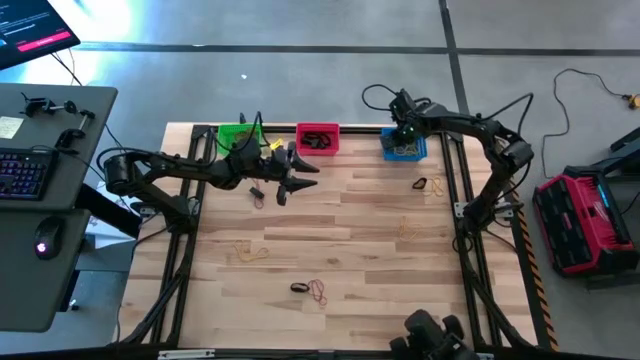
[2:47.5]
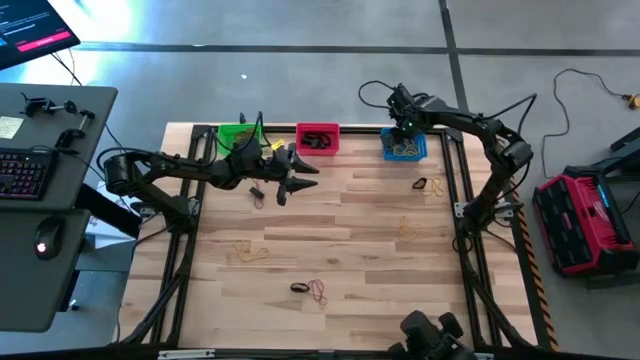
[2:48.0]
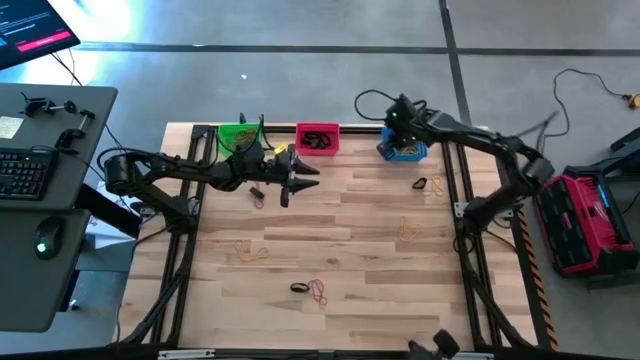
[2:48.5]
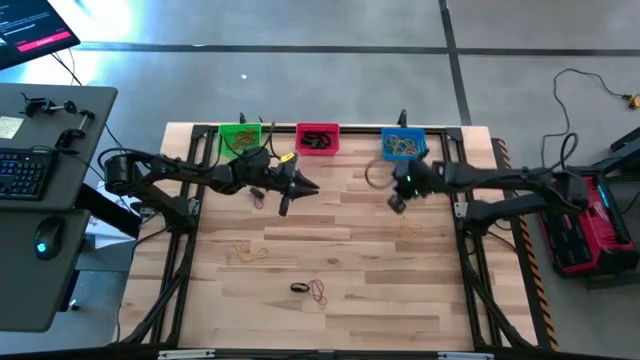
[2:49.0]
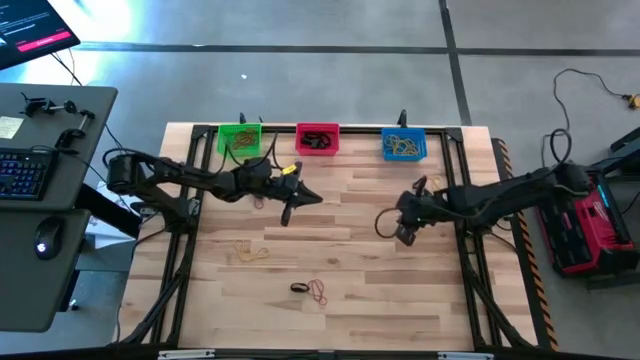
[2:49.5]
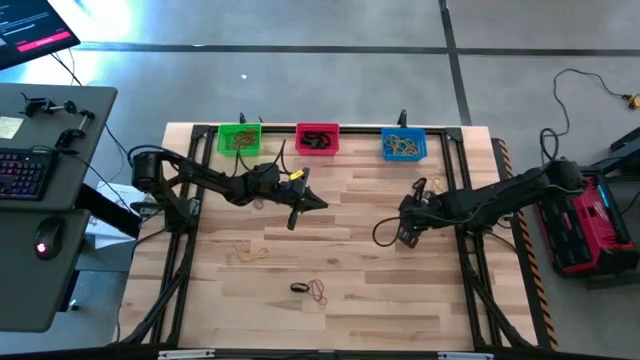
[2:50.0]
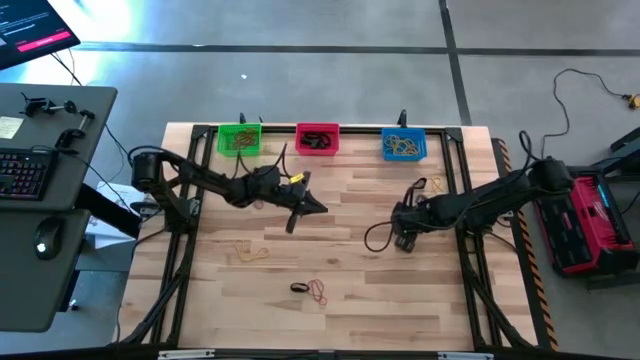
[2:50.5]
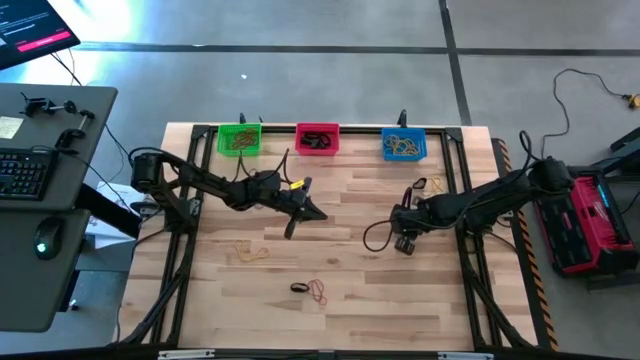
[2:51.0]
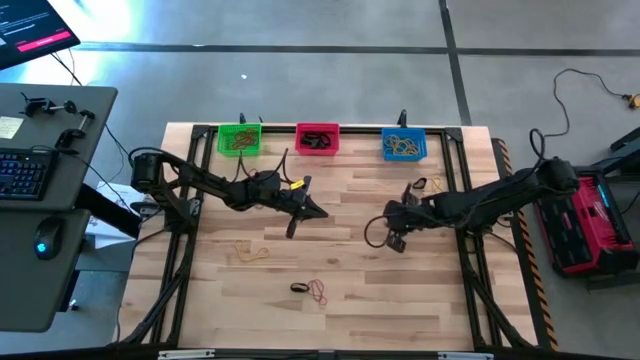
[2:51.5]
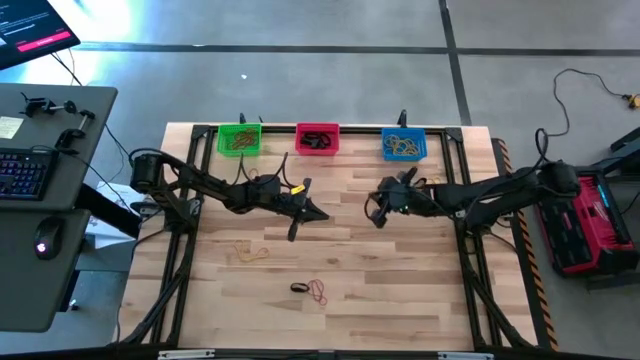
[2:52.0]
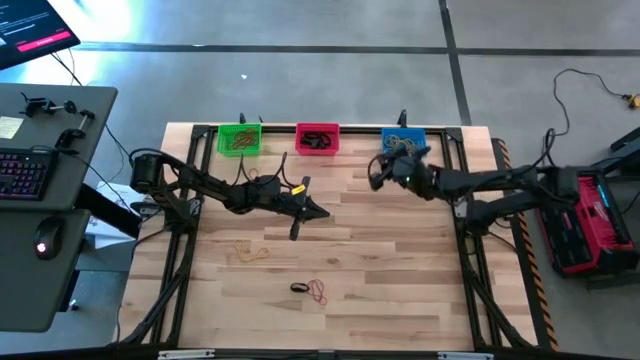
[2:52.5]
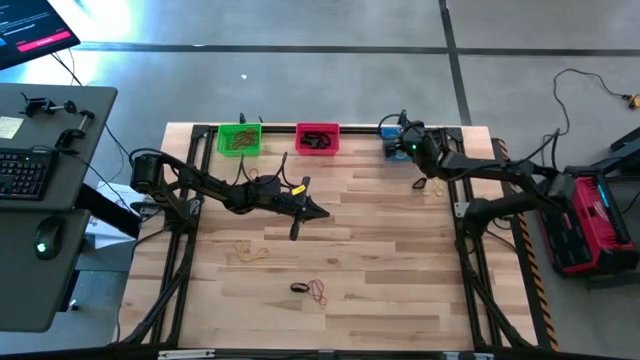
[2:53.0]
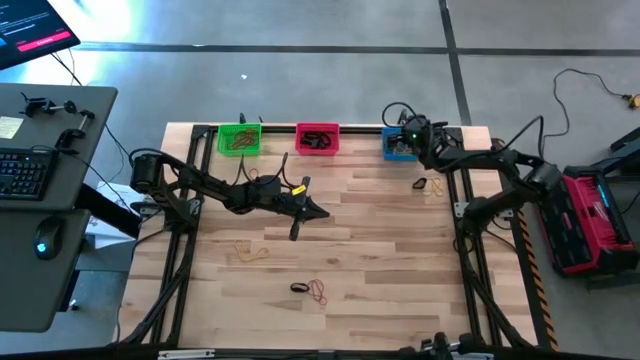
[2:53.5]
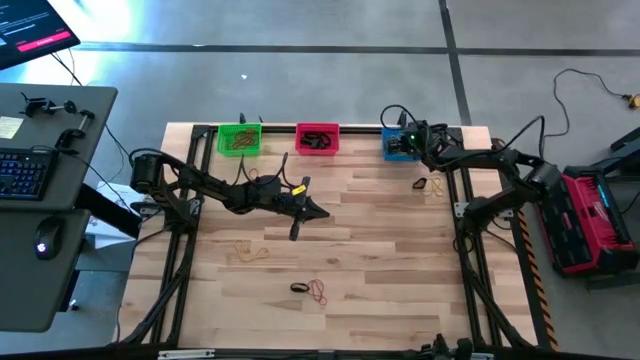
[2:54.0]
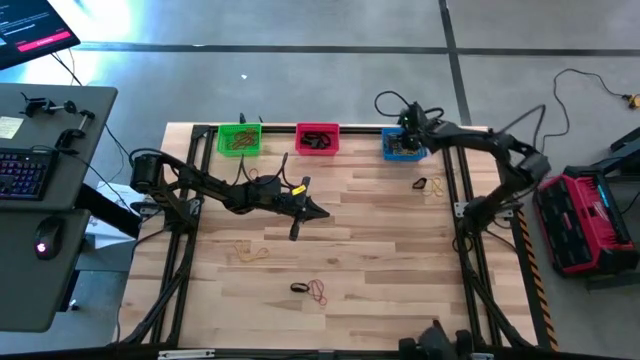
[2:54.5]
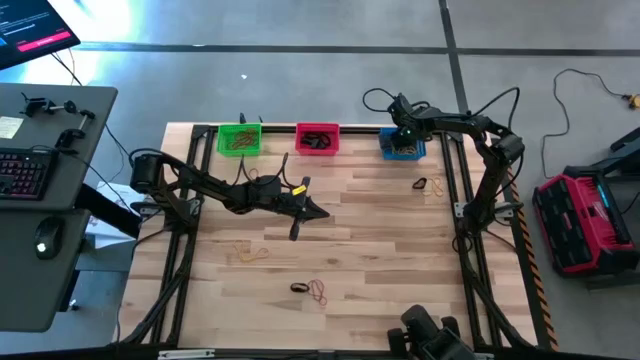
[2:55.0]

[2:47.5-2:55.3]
Task: Sort rubber bands into baskets
Put the yellow rubber band into the blue bin

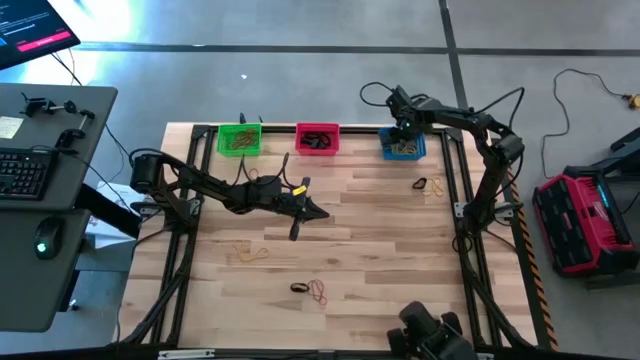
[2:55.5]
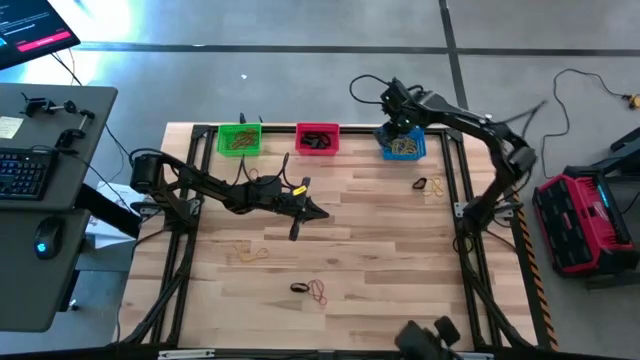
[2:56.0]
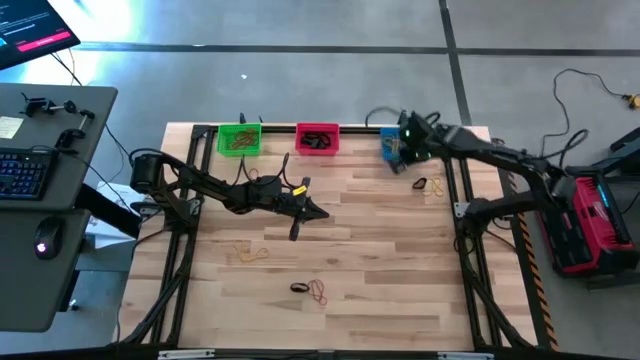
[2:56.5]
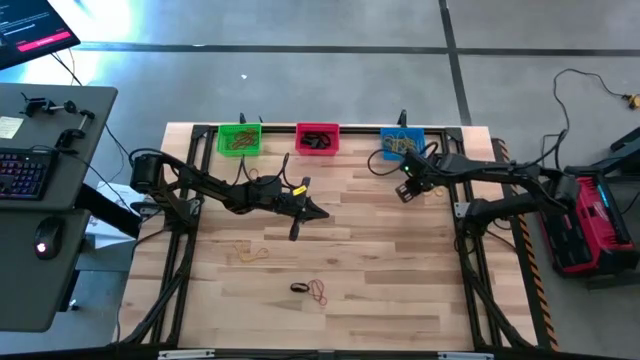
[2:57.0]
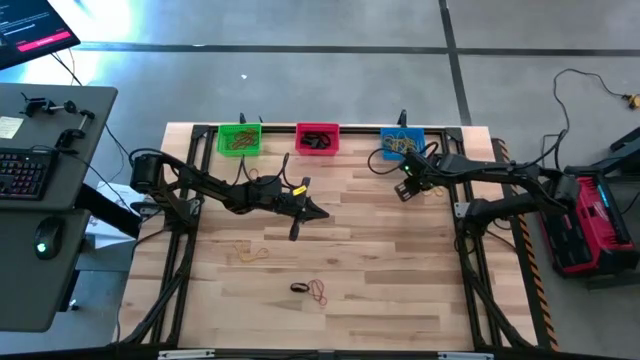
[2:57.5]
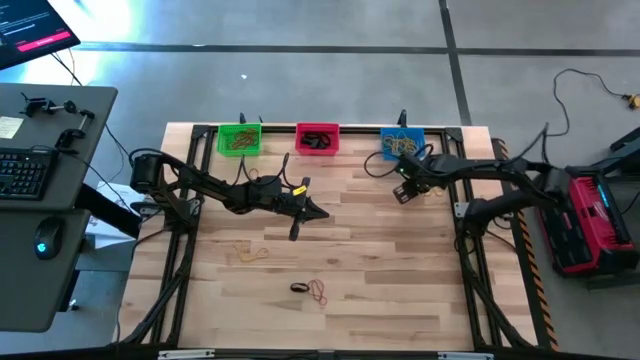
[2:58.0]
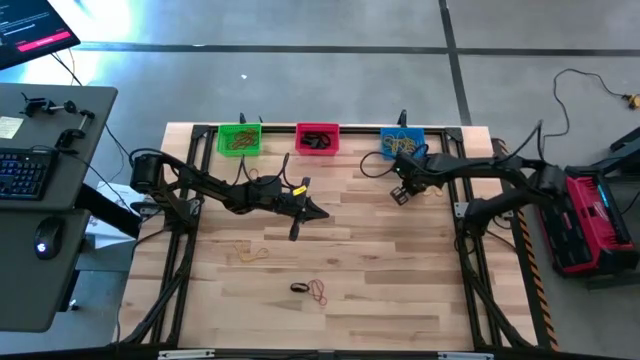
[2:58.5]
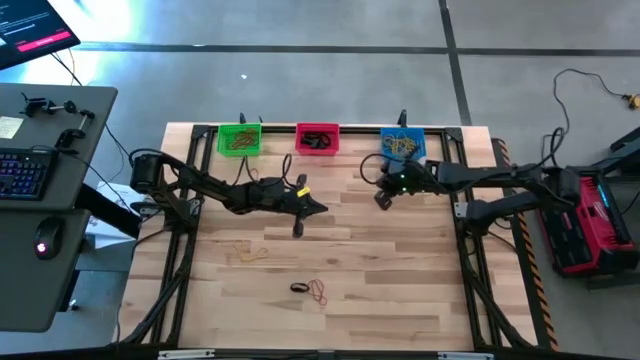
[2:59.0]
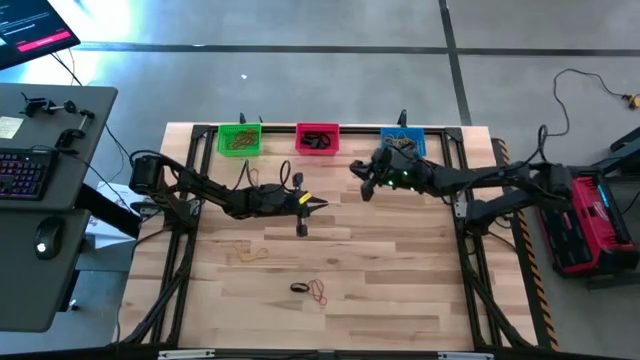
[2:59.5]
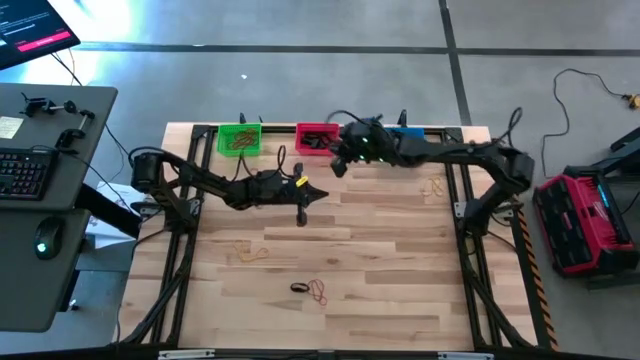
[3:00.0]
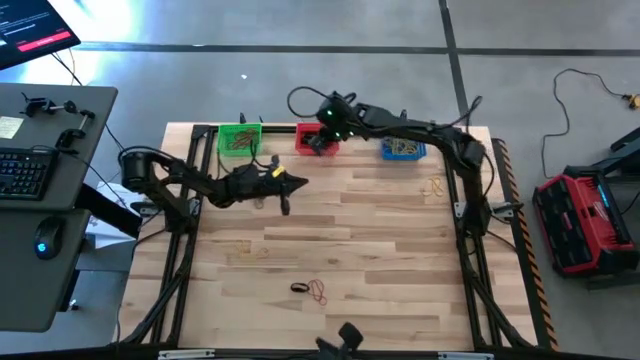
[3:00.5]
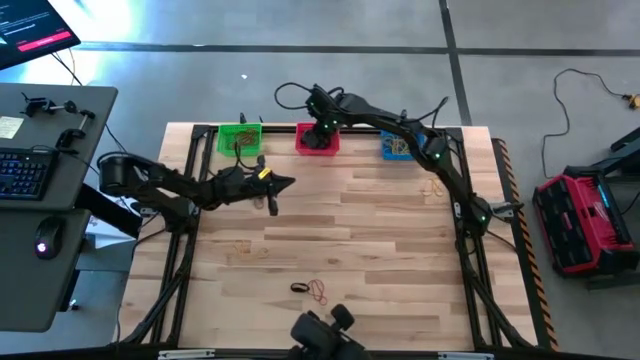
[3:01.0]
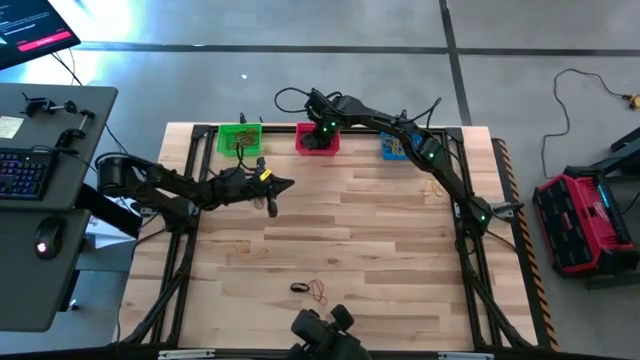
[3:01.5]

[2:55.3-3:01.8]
Put the black rubber band into the red bin

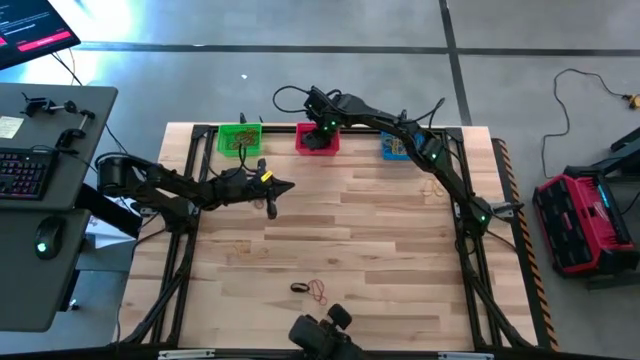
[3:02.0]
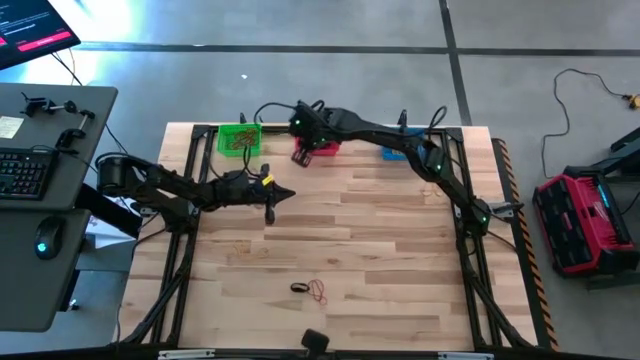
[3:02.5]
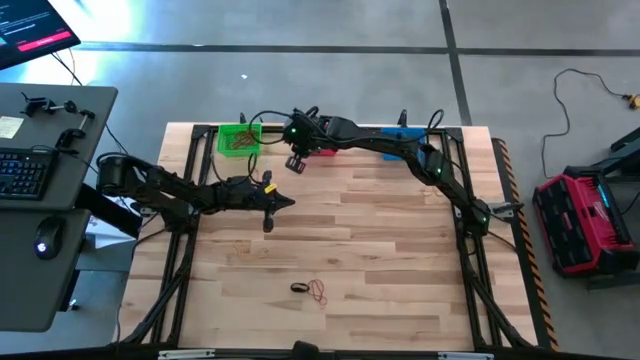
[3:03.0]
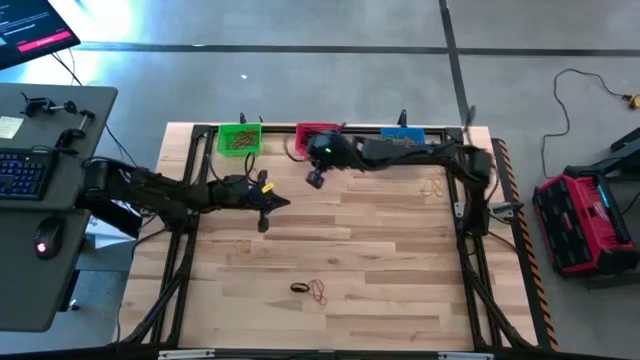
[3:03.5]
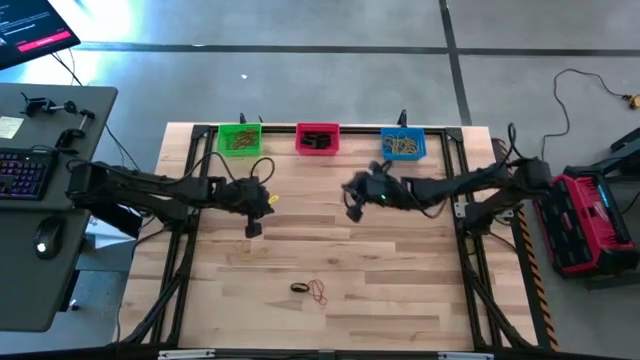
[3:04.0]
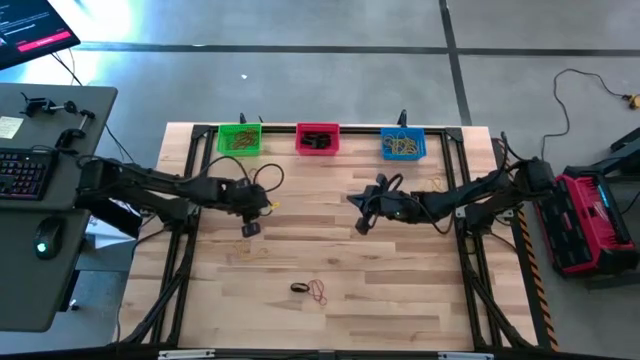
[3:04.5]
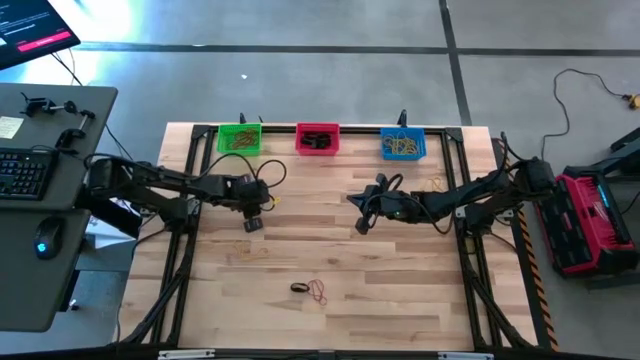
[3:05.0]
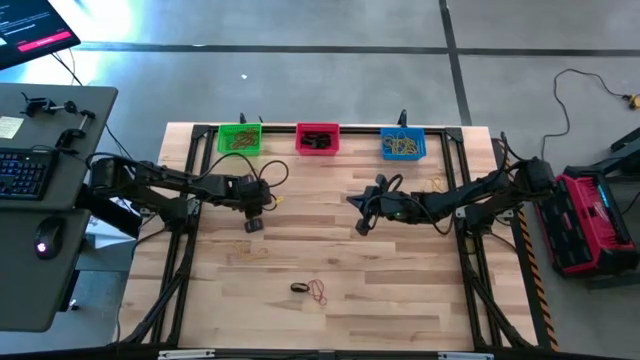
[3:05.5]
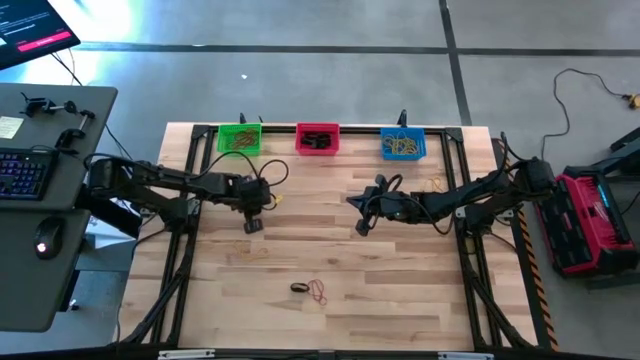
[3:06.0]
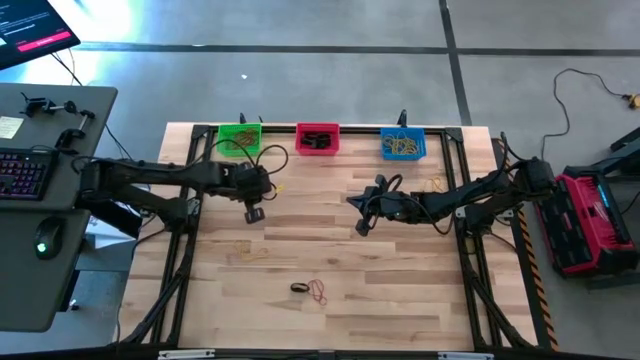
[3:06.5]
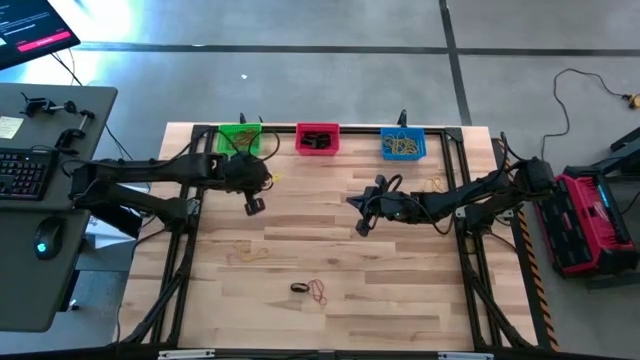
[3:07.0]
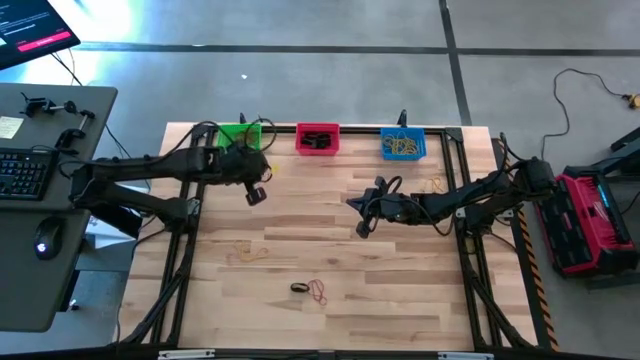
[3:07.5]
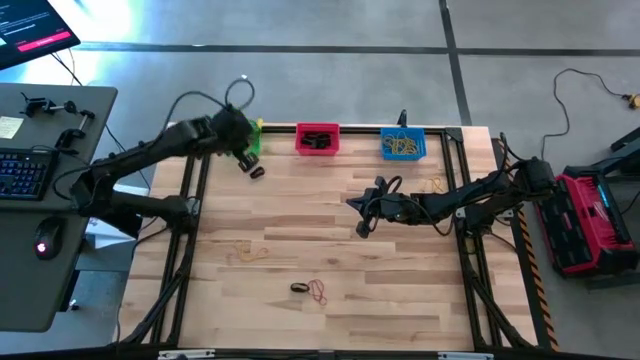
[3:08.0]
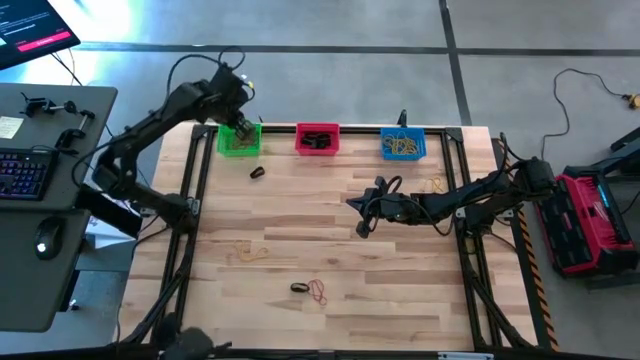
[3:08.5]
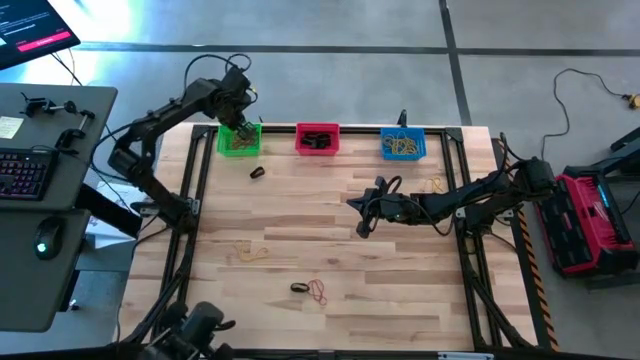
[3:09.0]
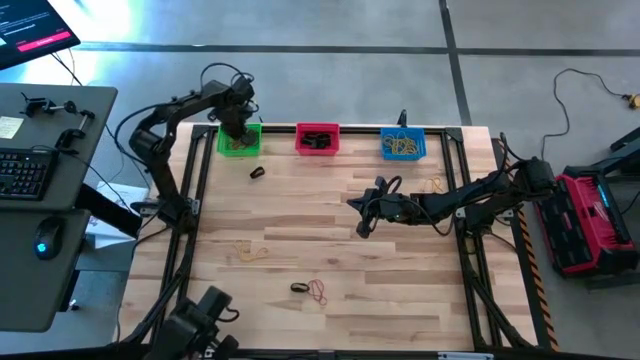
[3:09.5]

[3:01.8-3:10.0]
Put the red rubber band into the green bin
